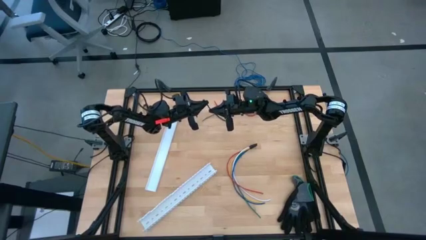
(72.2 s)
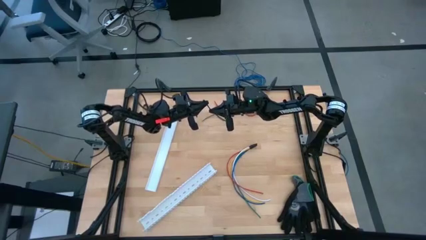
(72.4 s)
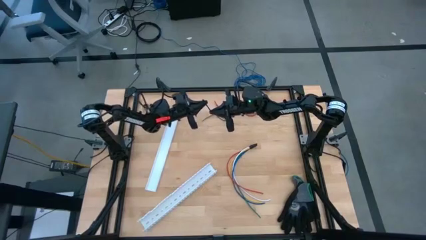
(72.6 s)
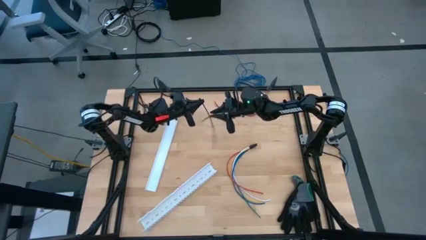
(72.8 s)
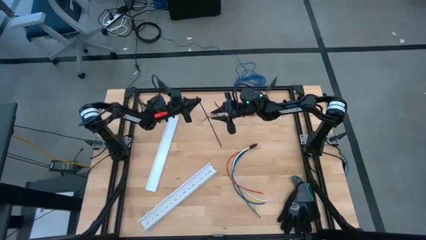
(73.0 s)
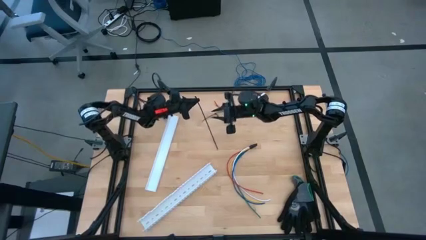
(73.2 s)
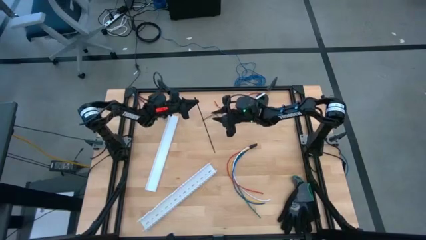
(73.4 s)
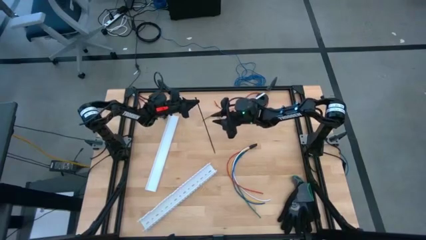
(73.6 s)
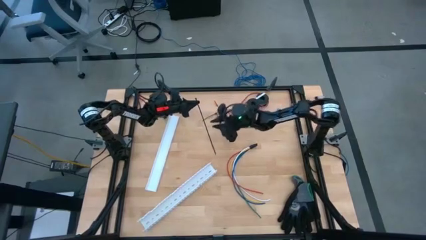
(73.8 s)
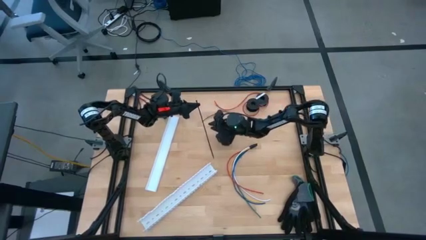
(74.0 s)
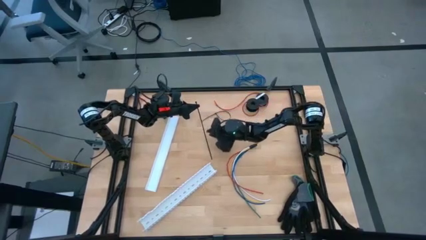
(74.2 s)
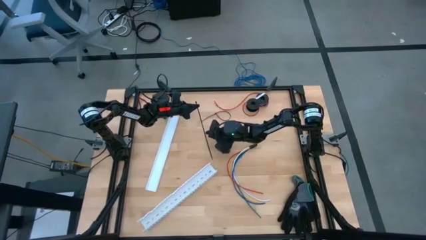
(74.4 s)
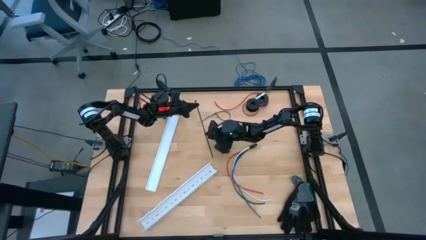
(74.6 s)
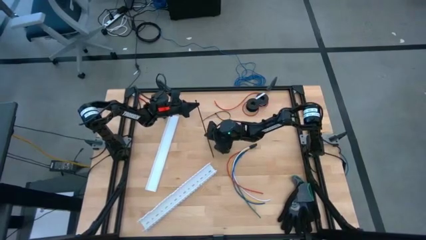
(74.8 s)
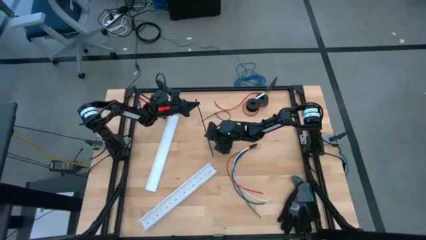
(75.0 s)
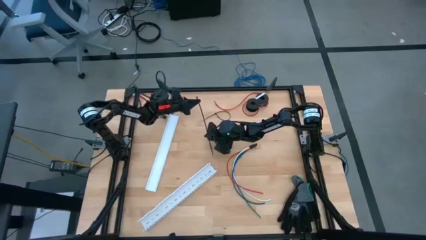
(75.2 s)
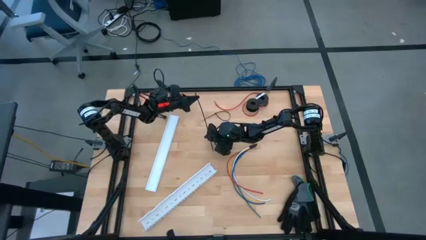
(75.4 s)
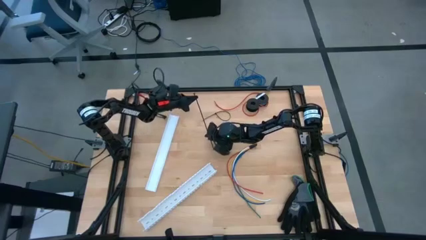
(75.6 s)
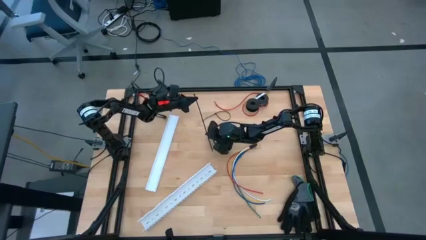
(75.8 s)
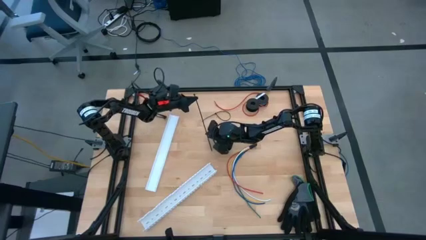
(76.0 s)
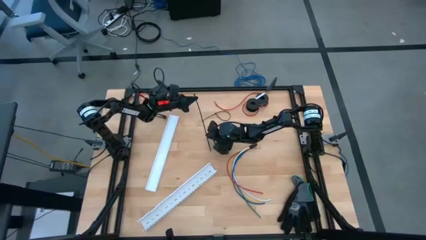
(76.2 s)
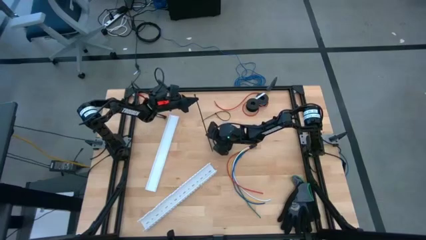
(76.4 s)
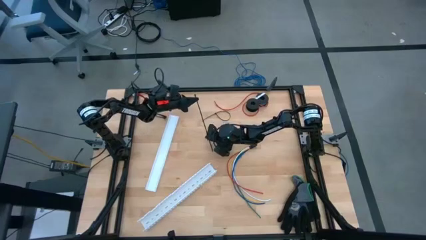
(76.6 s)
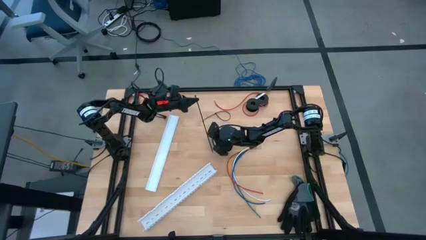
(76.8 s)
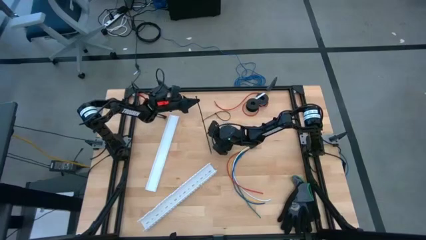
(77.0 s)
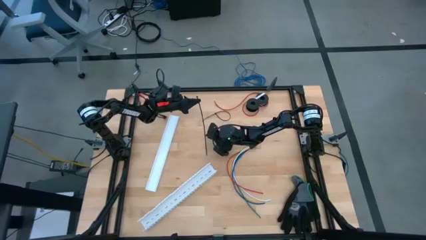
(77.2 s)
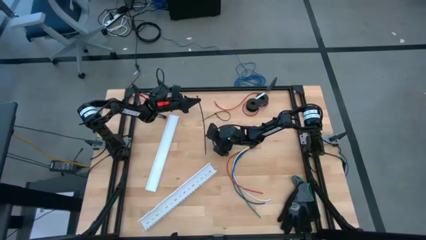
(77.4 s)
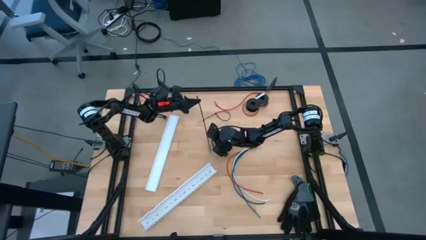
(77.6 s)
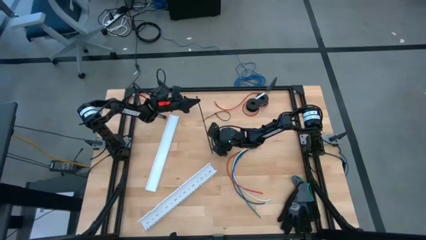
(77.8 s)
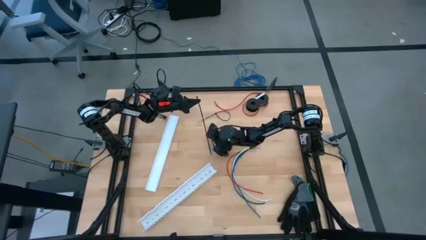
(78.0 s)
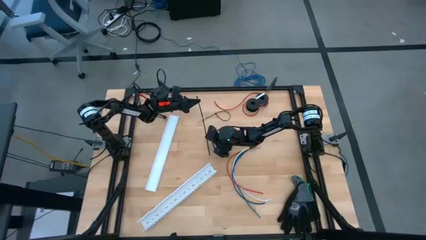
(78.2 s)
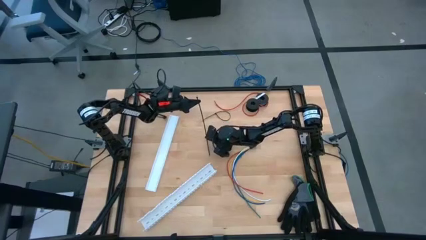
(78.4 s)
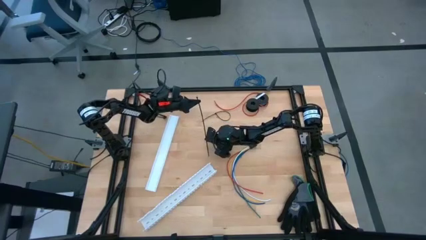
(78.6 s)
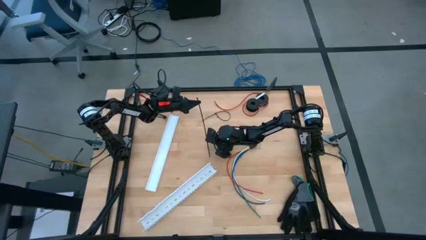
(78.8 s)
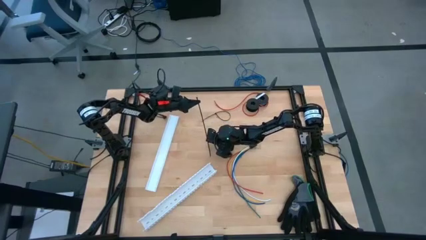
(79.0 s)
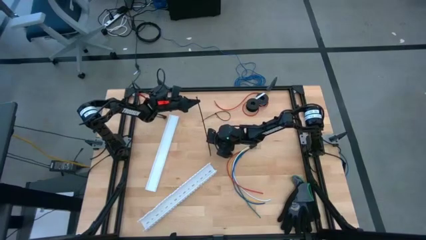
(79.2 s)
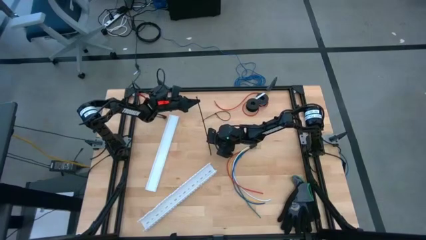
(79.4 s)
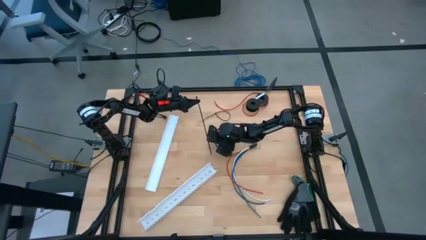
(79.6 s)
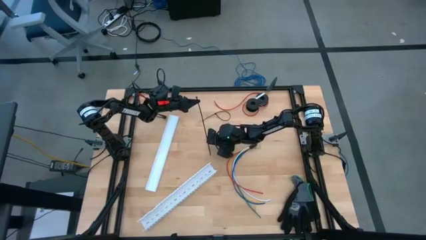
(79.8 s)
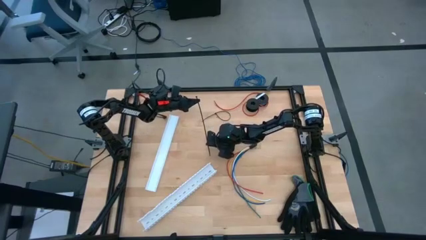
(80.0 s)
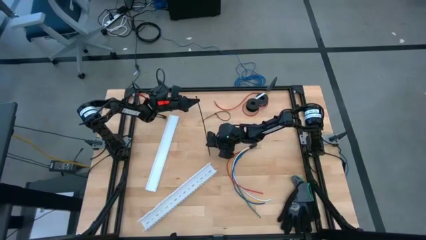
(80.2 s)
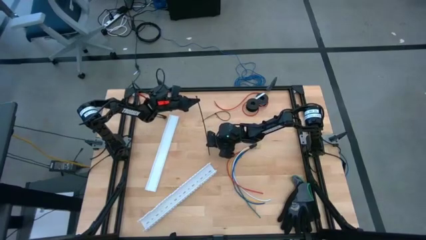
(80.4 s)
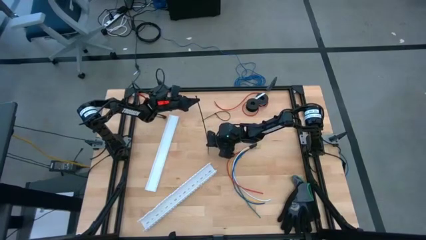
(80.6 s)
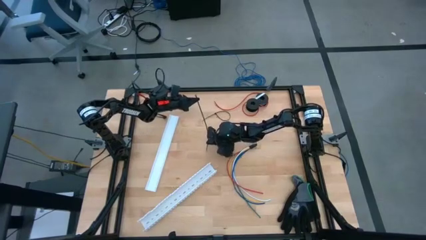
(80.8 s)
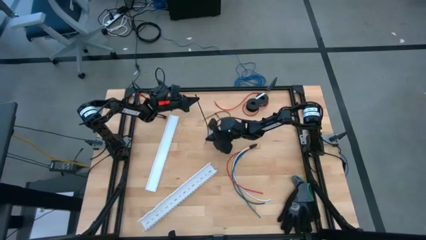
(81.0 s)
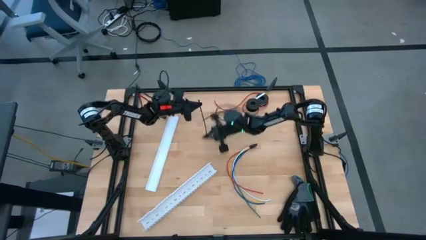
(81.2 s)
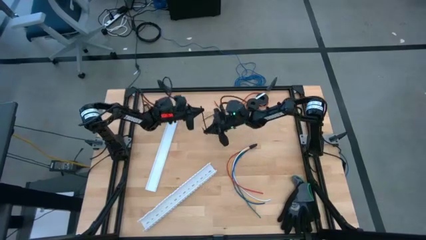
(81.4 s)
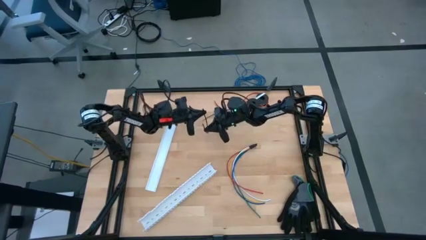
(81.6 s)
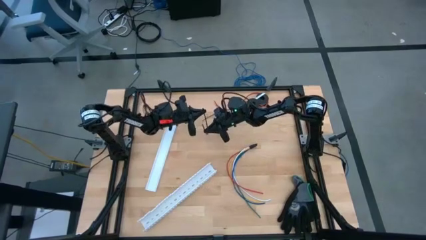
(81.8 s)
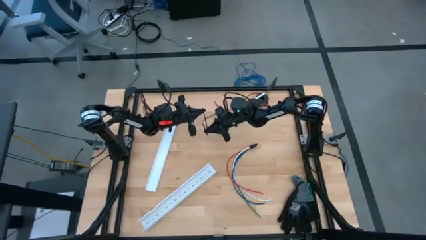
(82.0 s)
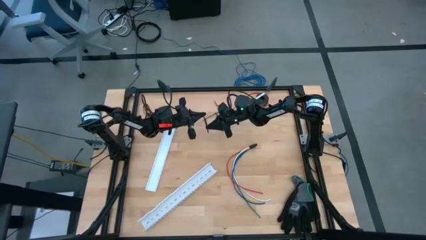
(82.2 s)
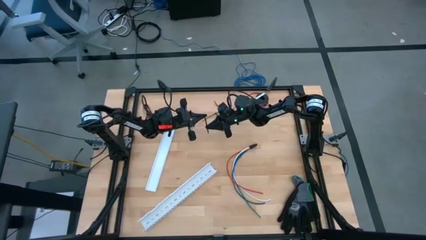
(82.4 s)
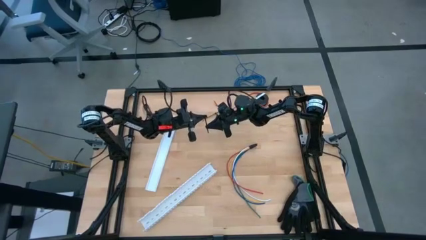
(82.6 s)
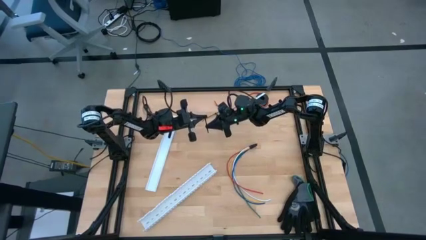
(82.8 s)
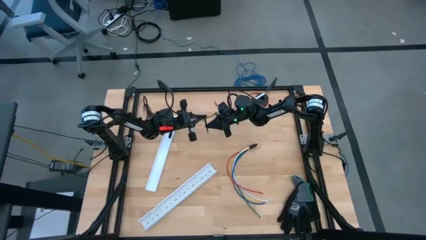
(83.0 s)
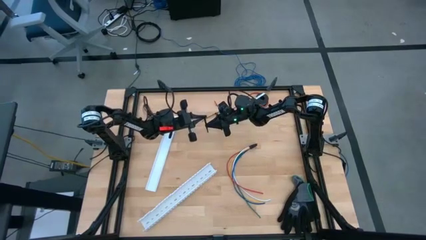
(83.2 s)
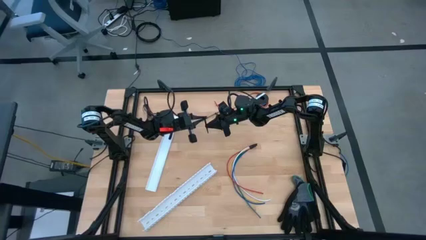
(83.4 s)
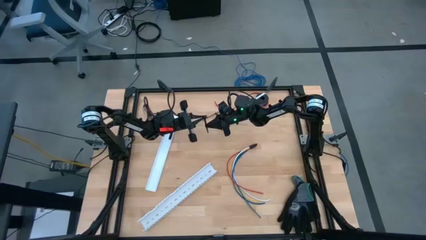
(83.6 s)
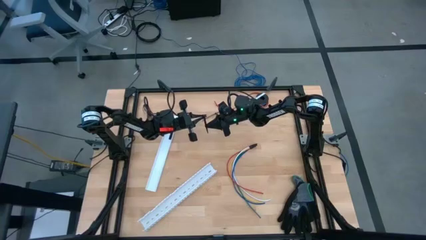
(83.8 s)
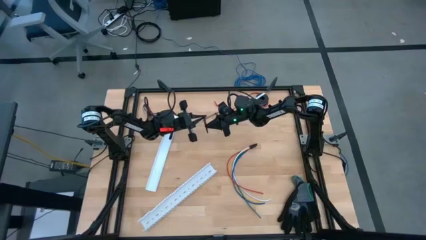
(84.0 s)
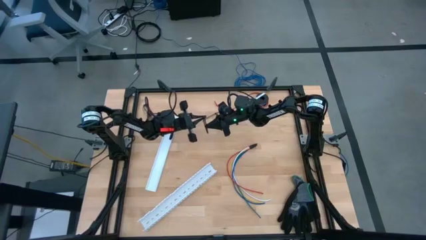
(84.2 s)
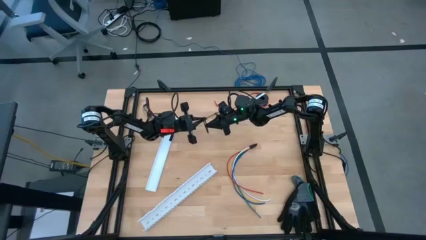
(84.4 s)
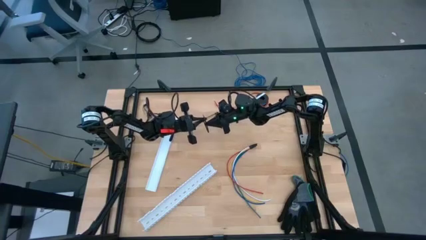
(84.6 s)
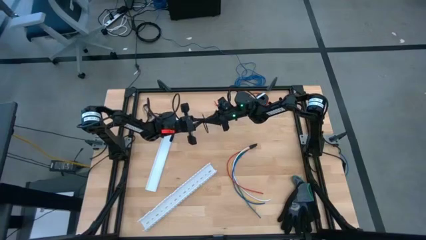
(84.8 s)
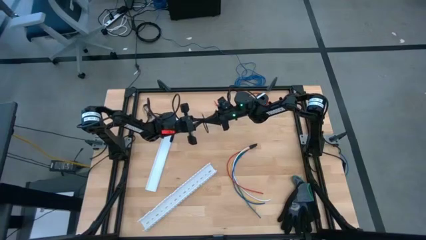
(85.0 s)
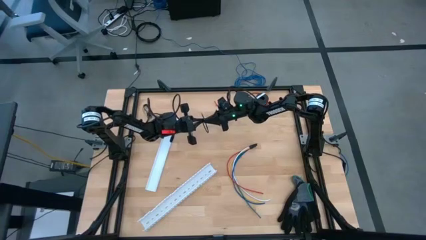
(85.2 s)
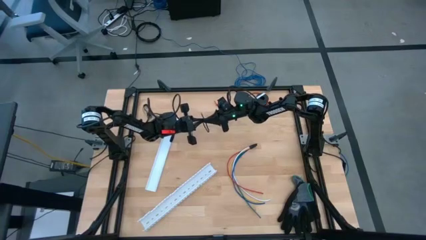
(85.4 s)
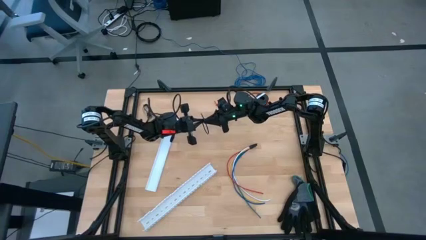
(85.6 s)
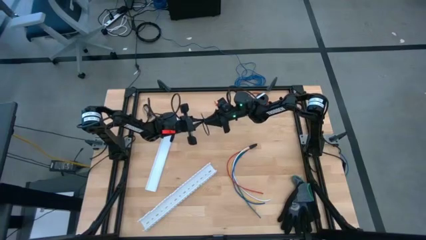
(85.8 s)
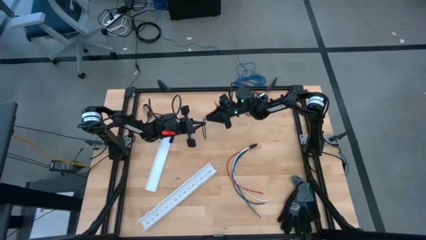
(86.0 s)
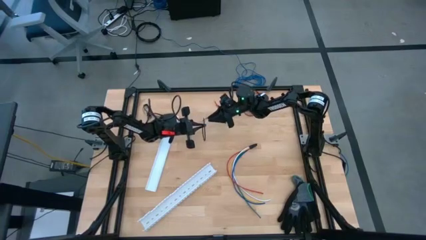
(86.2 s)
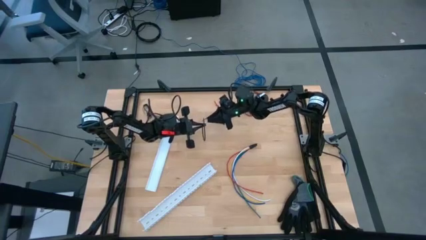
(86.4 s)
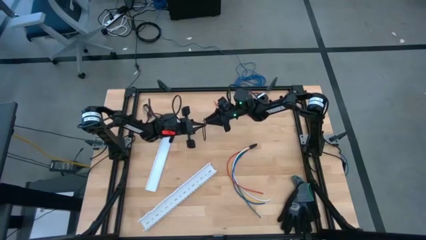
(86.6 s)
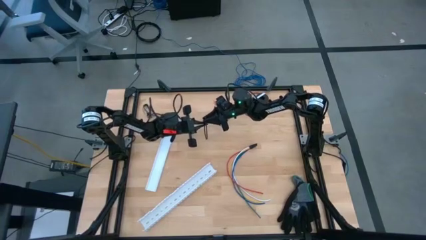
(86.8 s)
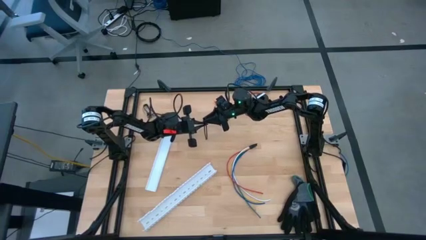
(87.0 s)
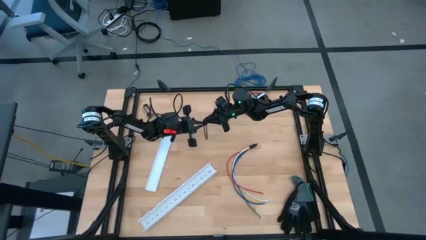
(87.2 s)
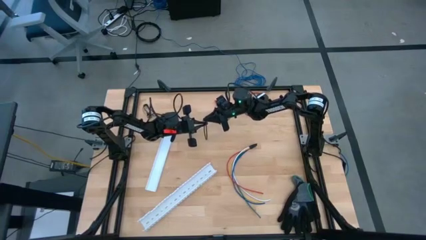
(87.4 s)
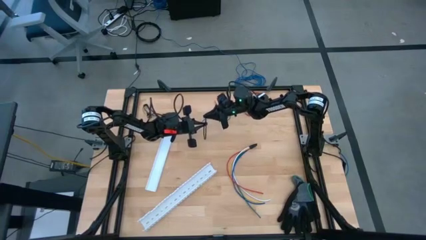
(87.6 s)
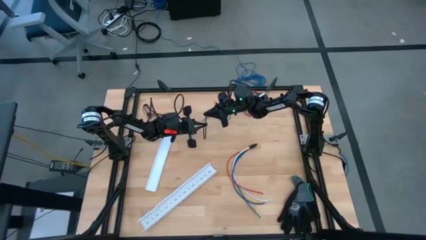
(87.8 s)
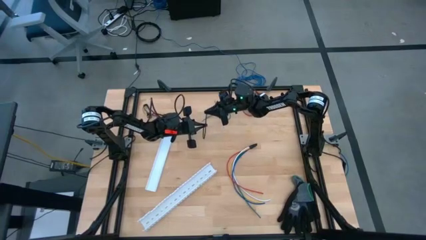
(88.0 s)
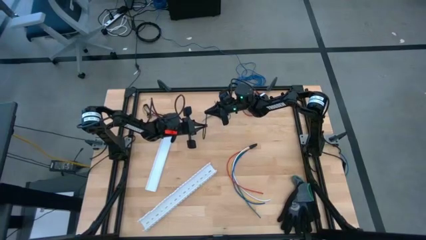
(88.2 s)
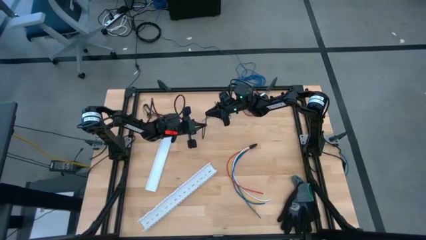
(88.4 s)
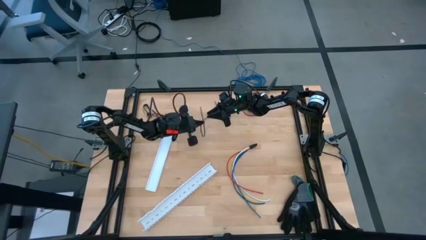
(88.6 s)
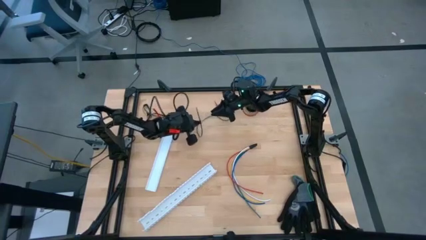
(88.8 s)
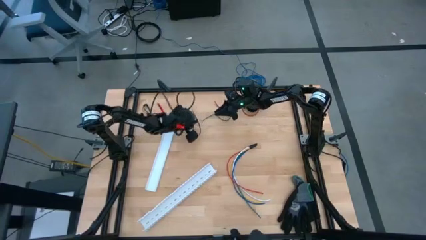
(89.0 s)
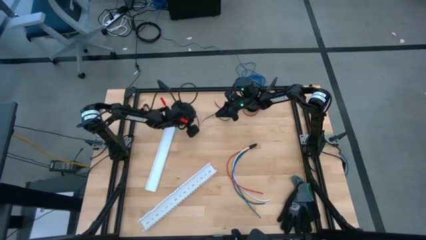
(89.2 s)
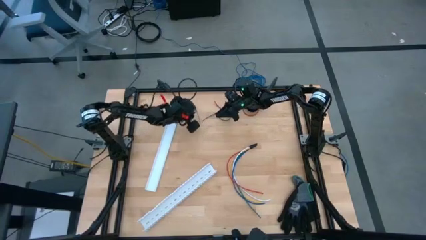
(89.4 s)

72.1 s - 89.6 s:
Task: Ziptie cables
Wrap the left black zip tie
